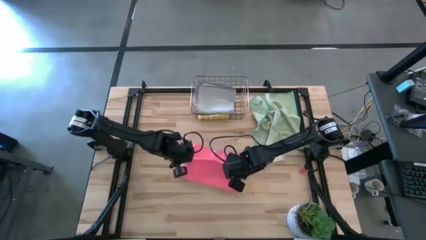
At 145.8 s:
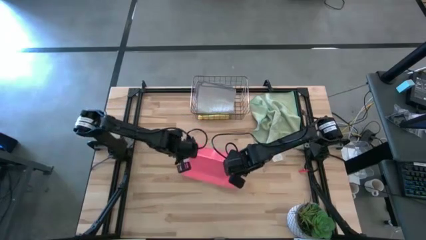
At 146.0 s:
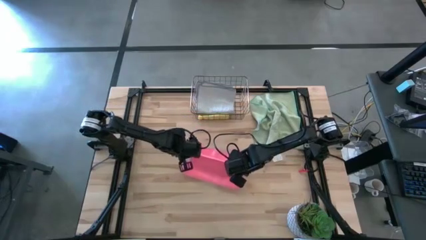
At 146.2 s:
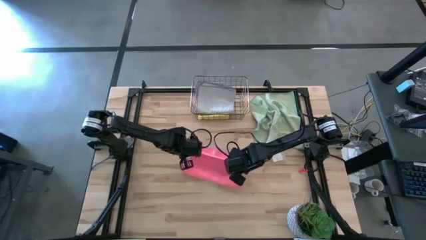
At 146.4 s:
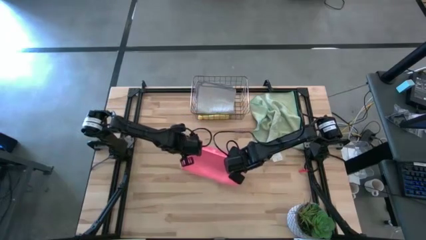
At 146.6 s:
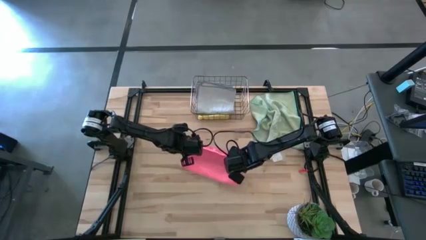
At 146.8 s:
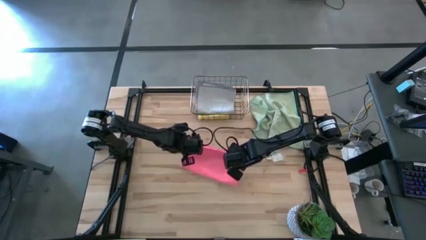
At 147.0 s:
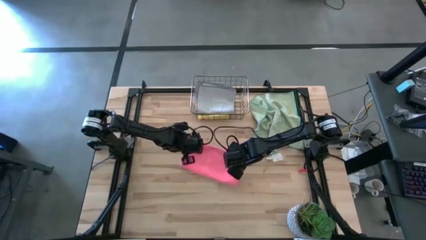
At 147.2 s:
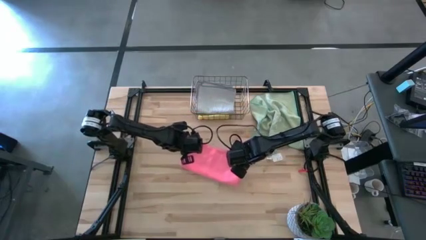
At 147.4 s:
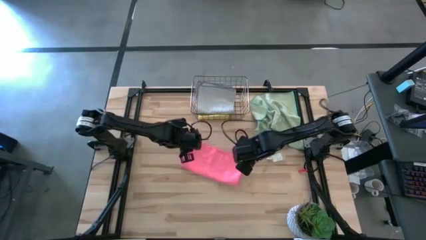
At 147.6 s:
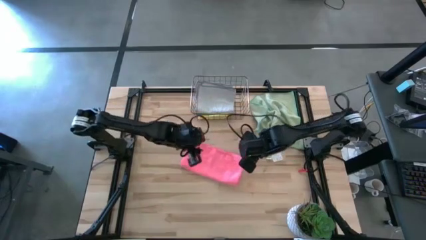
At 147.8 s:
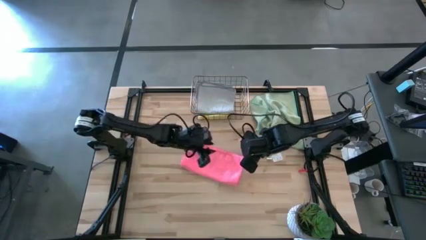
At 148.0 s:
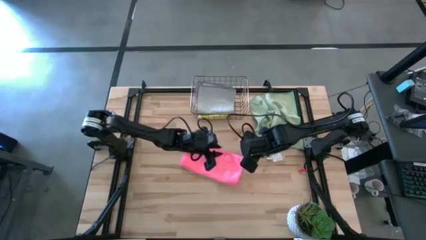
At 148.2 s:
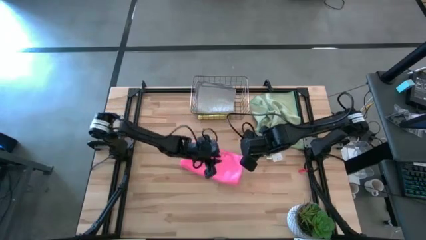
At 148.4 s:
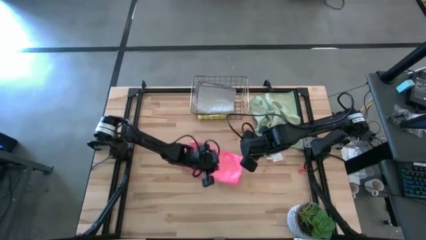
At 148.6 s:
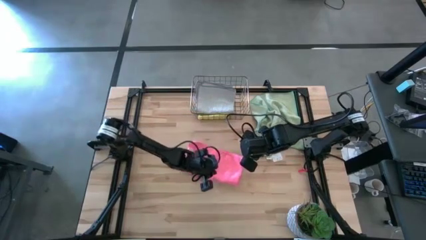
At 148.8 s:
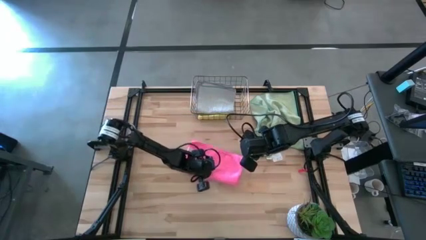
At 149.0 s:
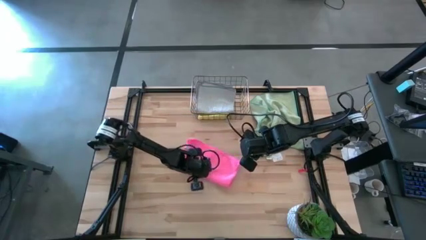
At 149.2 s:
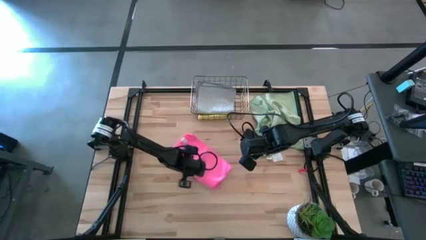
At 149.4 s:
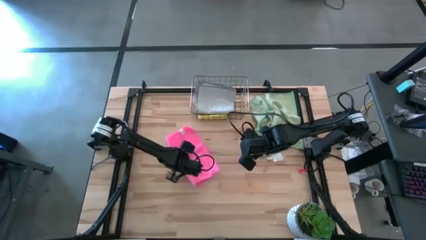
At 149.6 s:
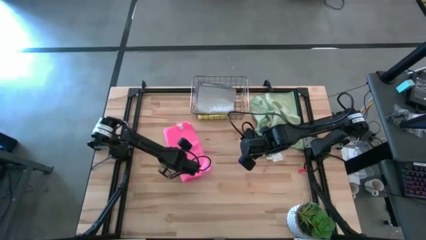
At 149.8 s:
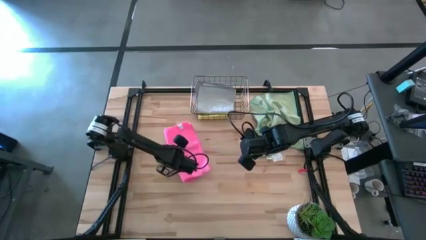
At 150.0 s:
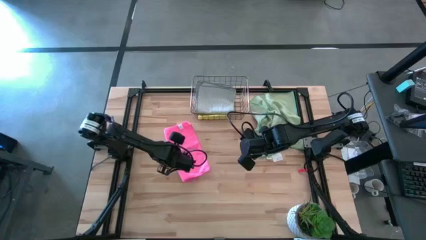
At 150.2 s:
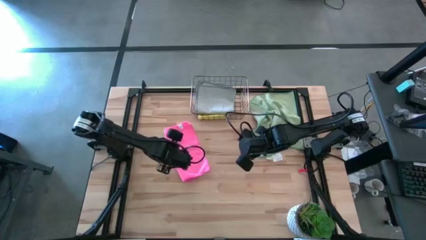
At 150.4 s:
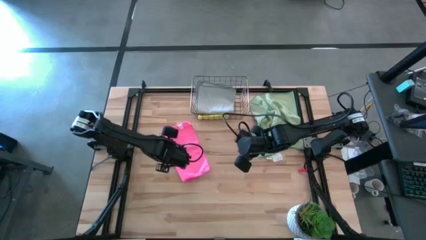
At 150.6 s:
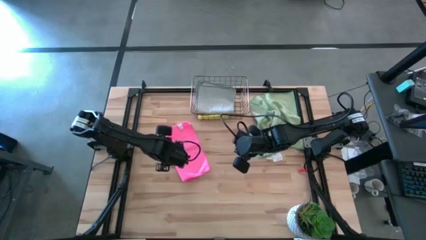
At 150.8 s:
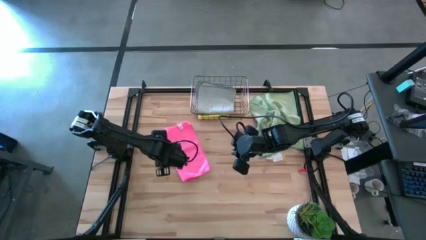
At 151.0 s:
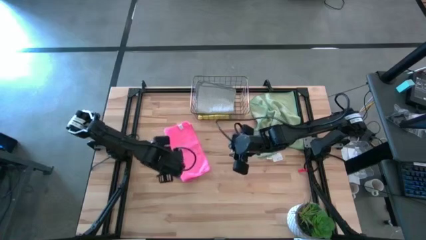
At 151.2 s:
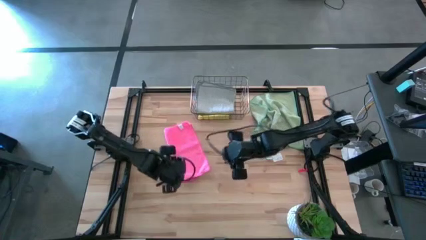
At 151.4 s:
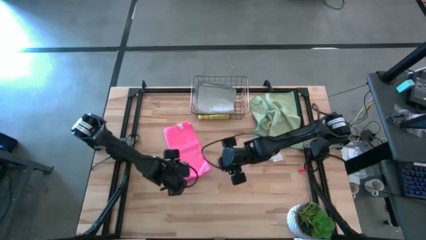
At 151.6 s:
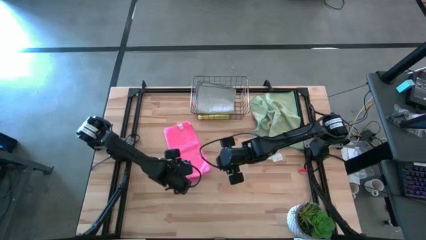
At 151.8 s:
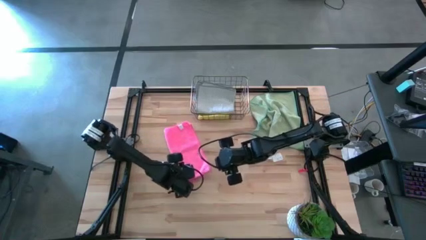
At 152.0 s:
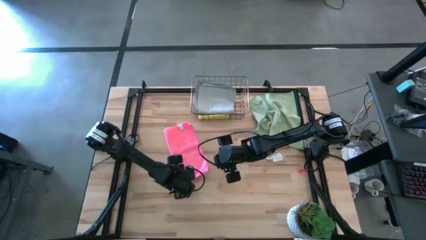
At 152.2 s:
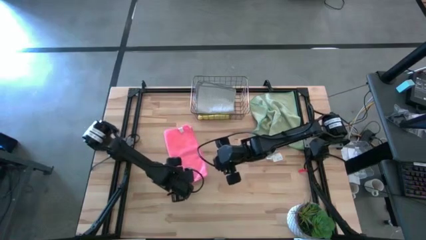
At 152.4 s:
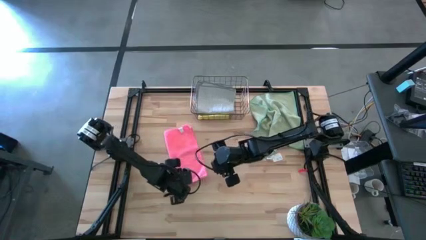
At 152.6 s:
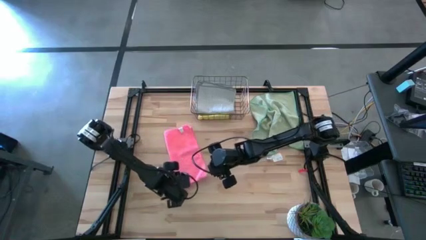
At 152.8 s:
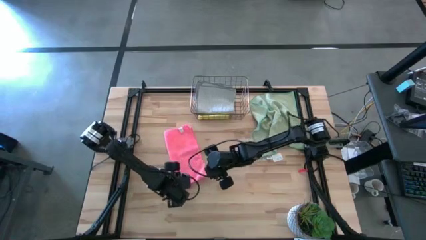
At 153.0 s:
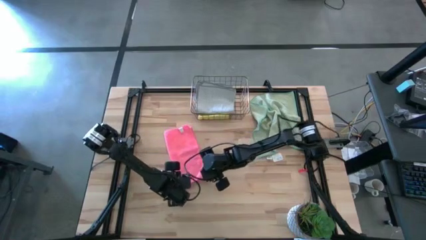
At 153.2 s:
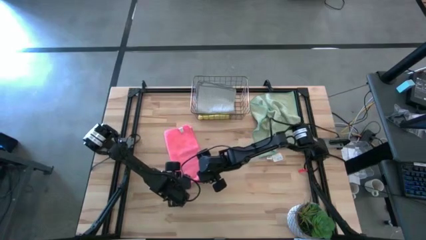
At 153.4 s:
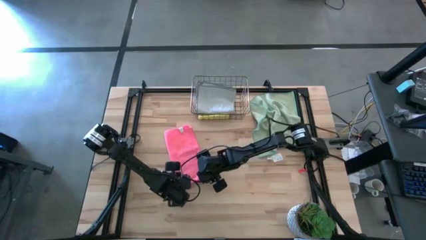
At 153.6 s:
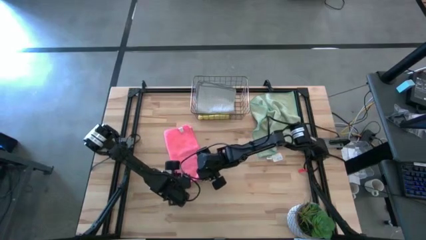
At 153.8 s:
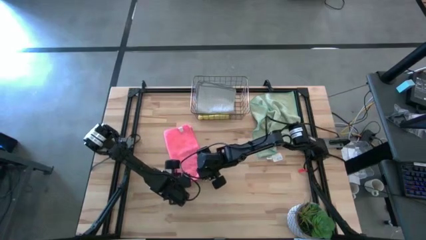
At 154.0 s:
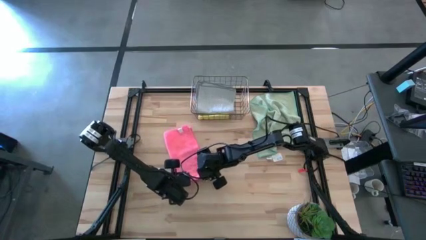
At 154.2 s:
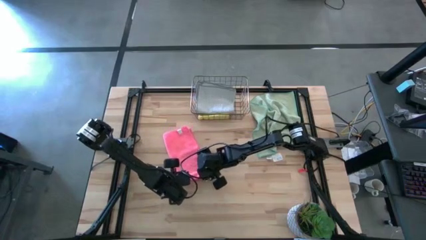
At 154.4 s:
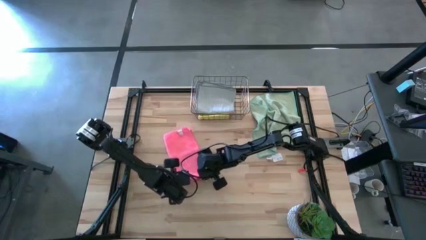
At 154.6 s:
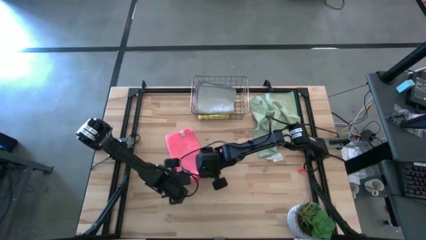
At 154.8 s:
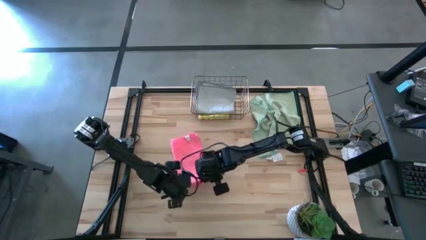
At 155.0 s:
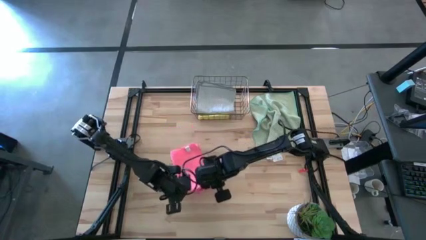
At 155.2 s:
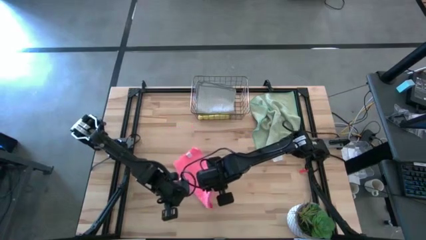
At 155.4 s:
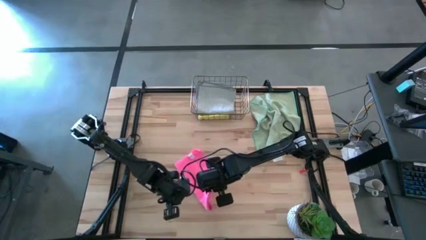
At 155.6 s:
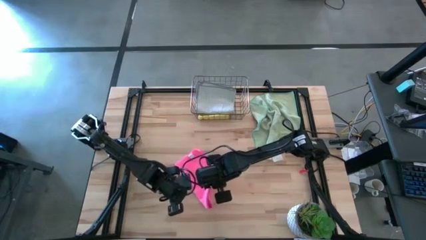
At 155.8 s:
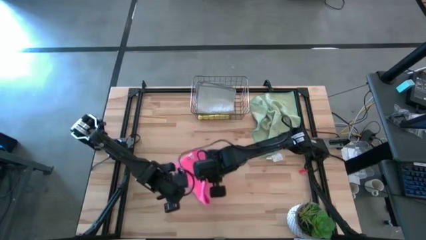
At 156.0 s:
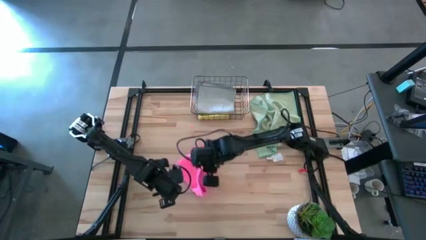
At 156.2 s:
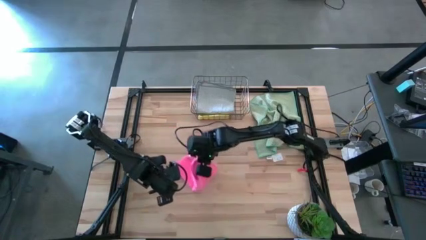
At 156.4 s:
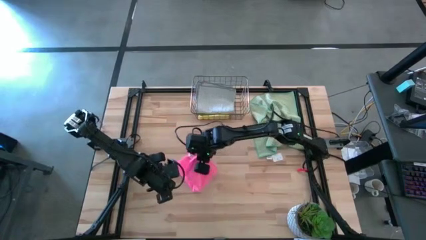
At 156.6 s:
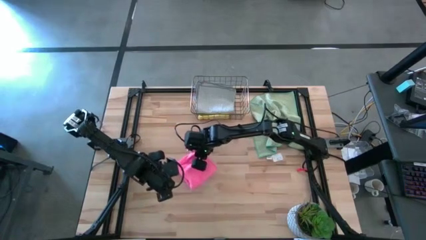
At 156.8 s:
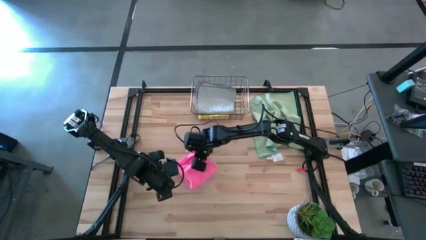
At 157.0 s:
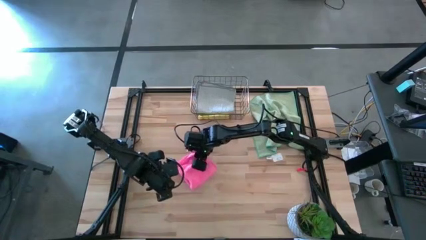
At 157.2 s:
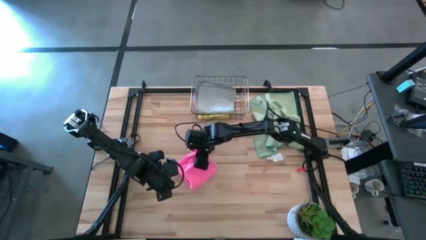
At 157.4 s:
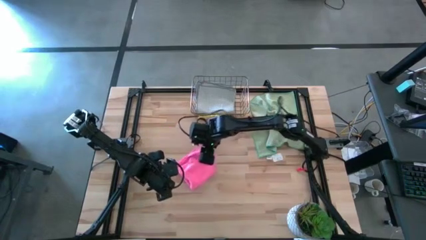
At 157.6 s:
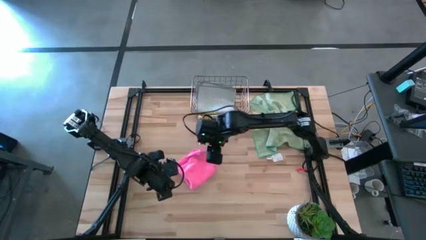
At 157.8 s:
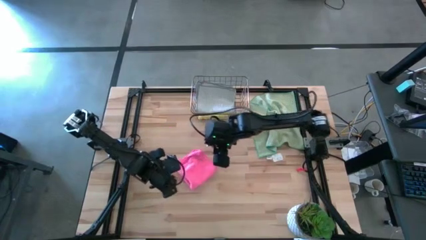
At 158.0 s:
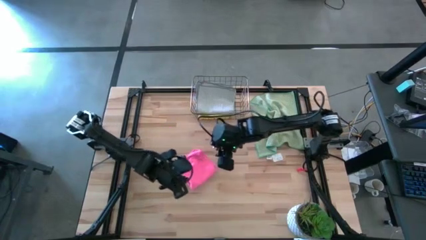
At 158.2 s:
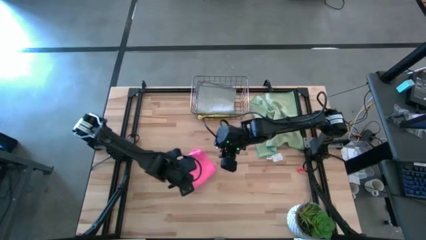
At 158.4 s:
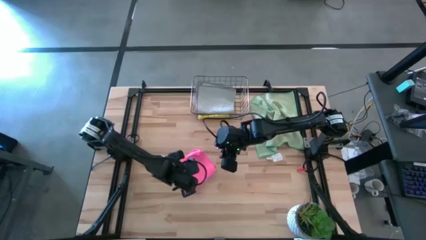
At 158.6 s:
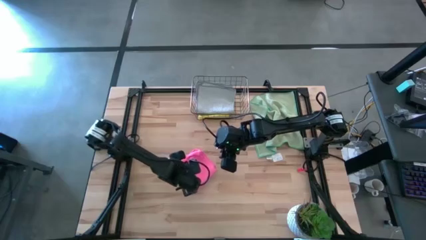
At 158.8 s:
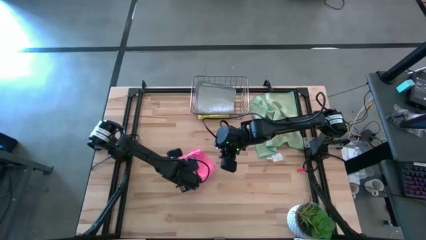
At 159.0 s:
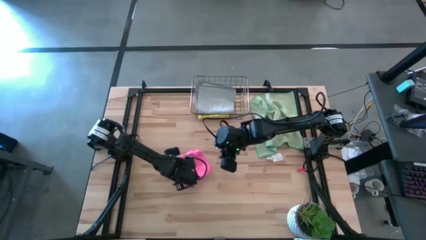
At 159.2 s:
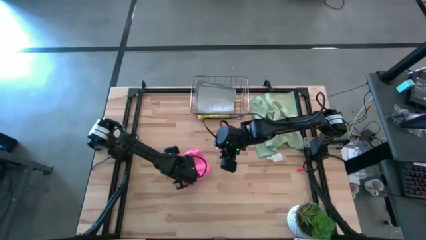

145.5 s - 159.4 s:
Task: Fold microfiber towels
Fold the pink towel
